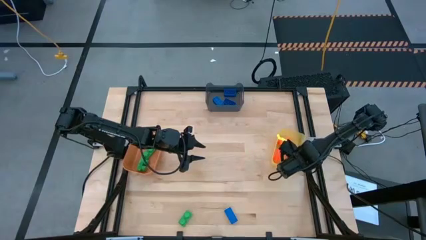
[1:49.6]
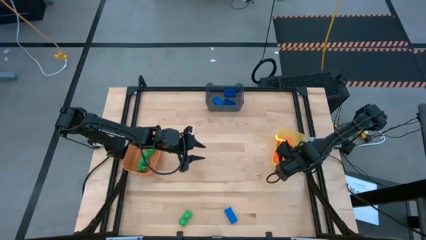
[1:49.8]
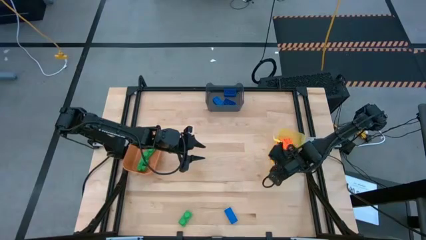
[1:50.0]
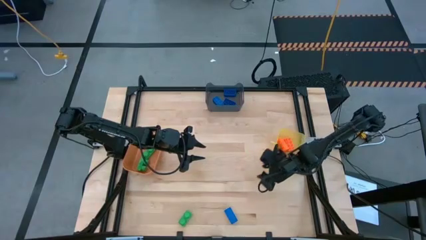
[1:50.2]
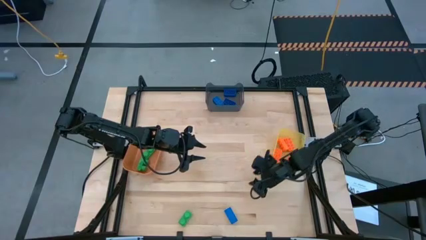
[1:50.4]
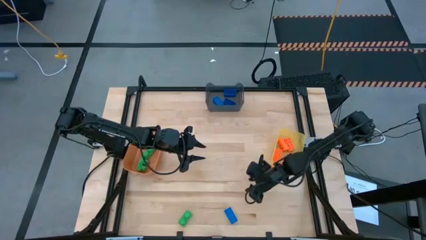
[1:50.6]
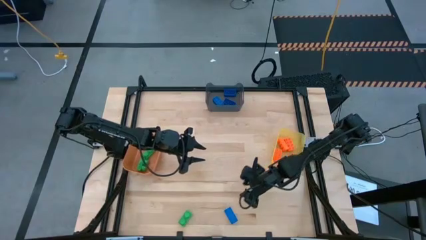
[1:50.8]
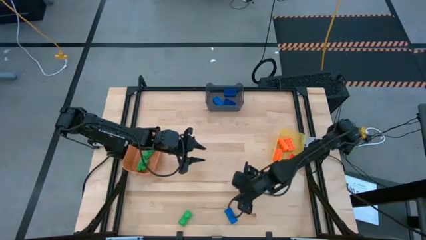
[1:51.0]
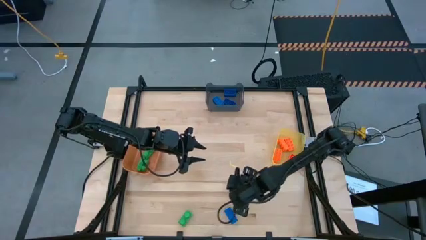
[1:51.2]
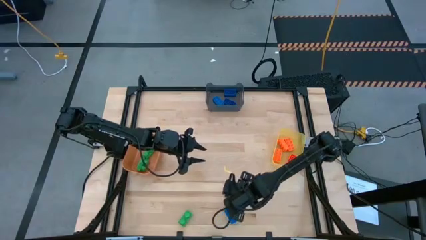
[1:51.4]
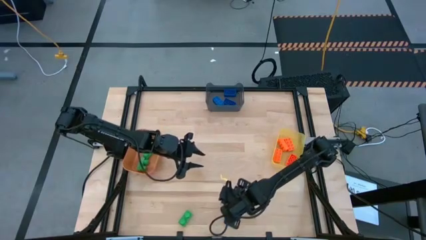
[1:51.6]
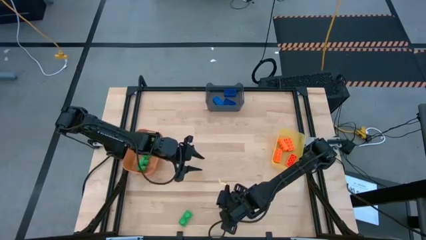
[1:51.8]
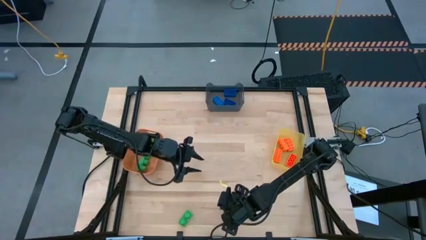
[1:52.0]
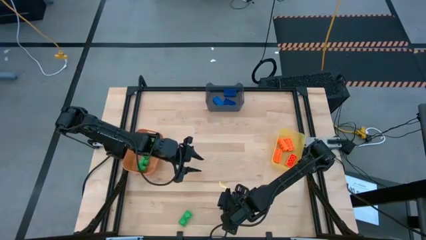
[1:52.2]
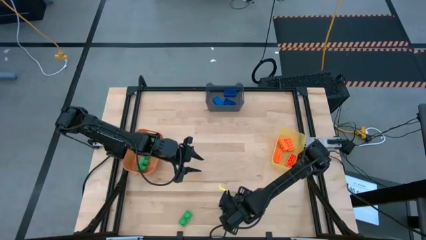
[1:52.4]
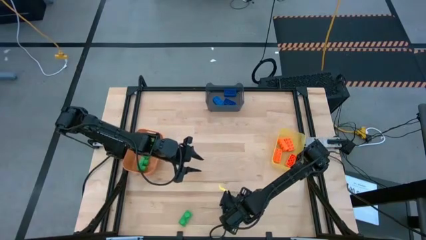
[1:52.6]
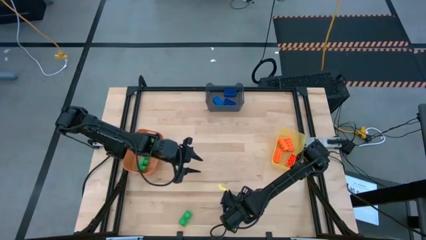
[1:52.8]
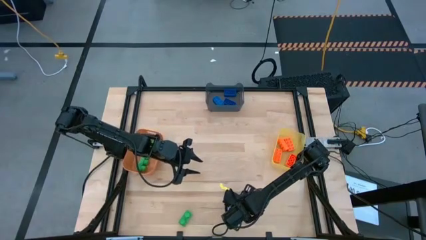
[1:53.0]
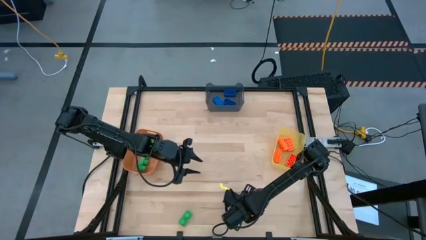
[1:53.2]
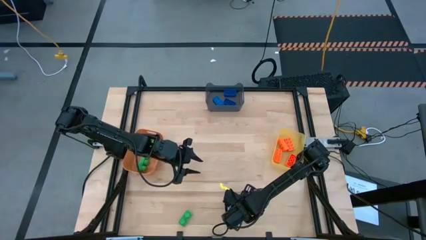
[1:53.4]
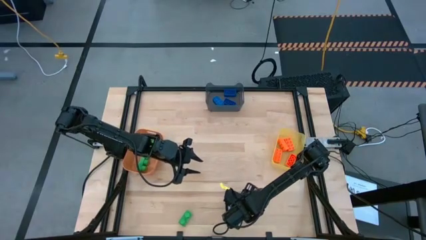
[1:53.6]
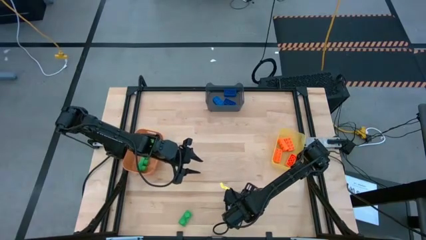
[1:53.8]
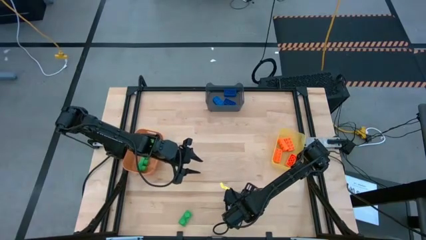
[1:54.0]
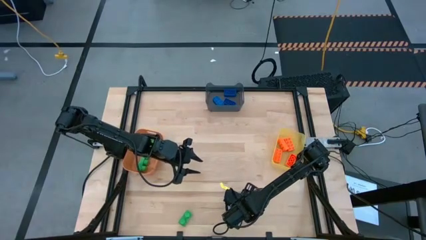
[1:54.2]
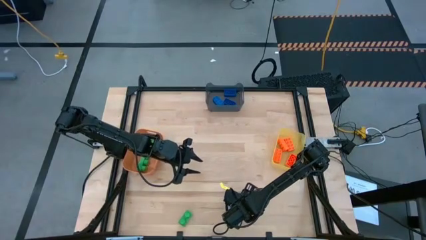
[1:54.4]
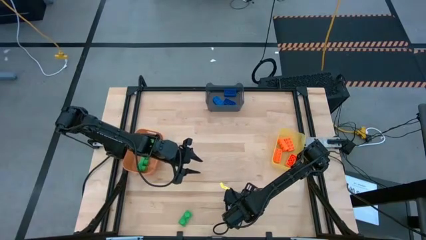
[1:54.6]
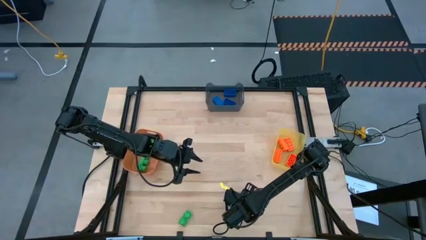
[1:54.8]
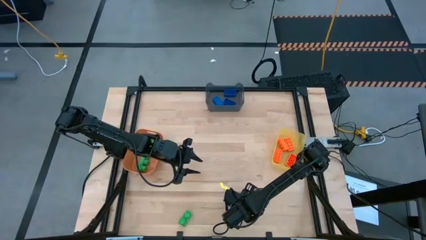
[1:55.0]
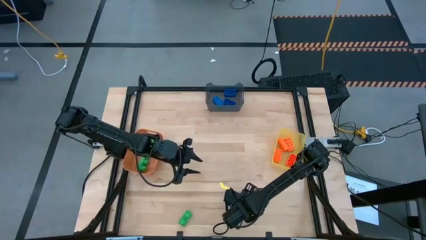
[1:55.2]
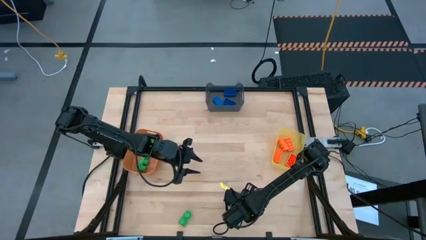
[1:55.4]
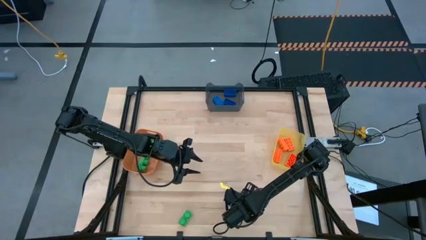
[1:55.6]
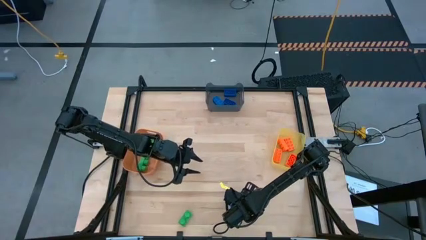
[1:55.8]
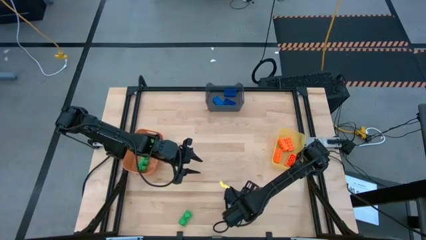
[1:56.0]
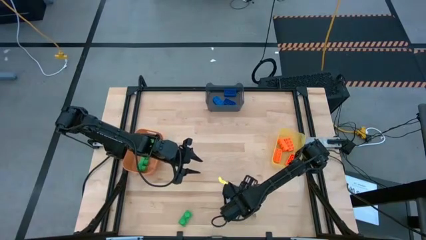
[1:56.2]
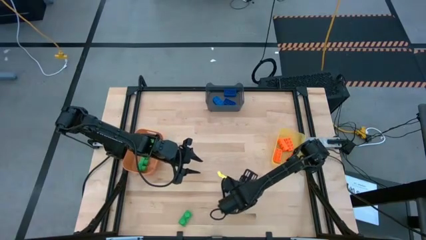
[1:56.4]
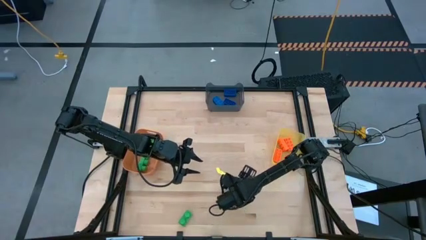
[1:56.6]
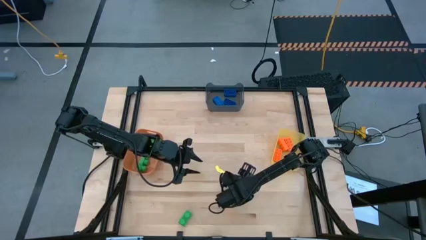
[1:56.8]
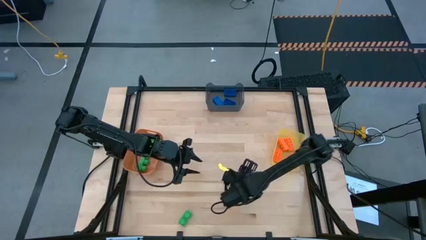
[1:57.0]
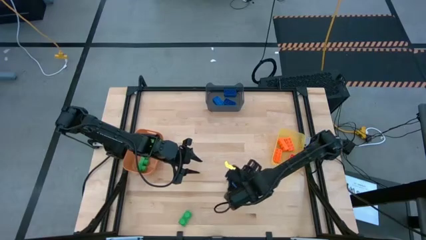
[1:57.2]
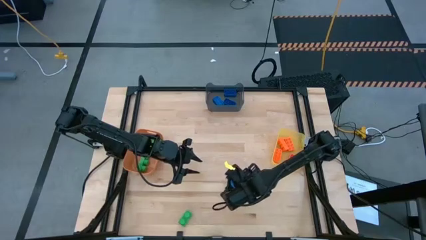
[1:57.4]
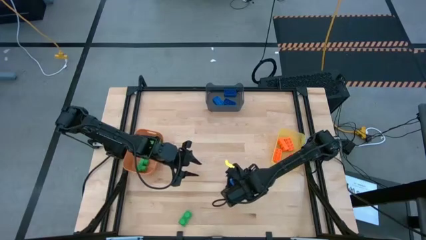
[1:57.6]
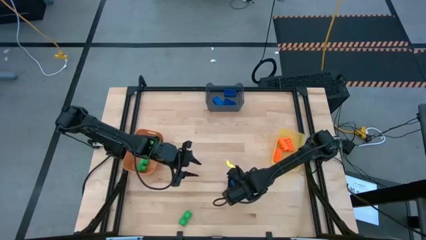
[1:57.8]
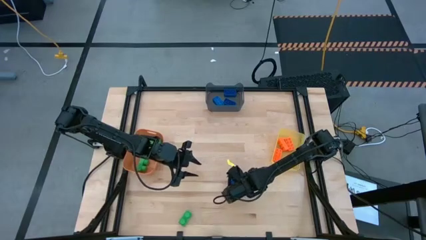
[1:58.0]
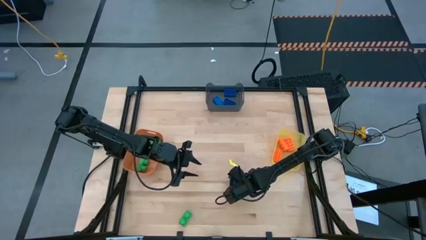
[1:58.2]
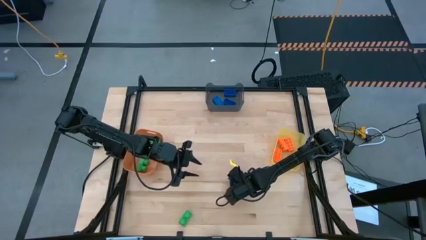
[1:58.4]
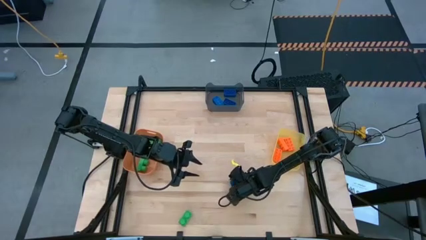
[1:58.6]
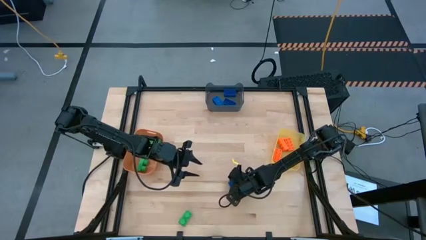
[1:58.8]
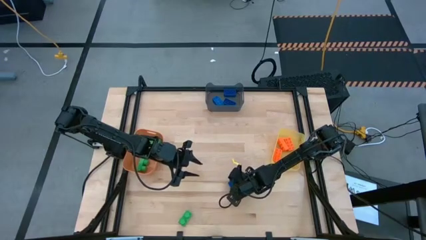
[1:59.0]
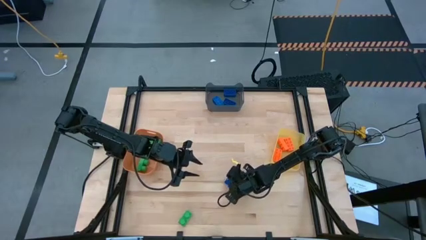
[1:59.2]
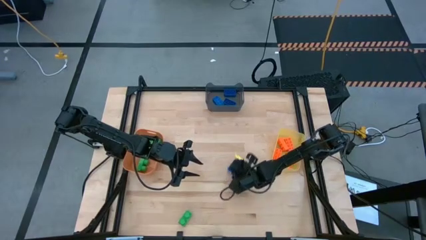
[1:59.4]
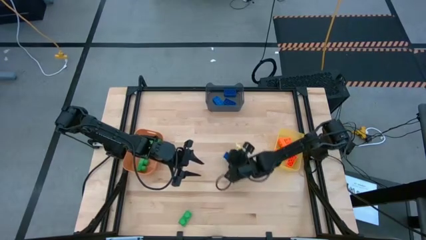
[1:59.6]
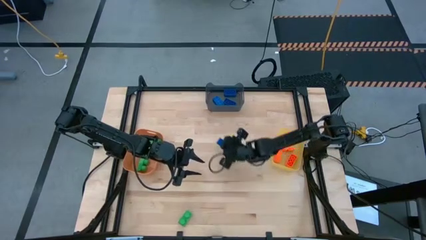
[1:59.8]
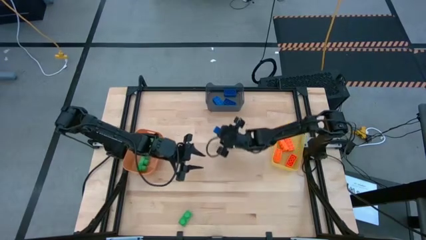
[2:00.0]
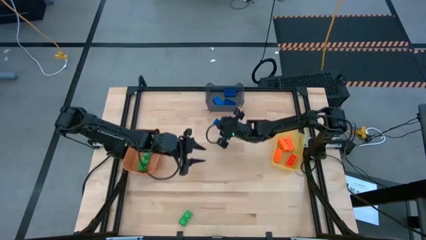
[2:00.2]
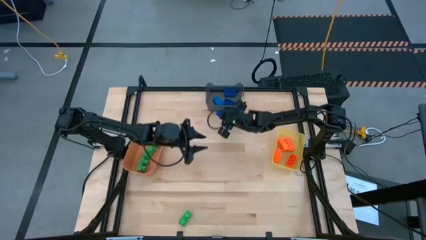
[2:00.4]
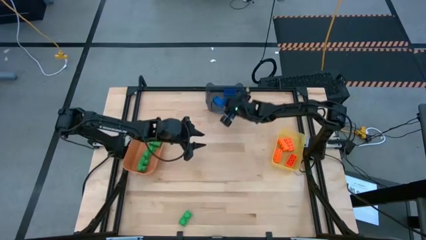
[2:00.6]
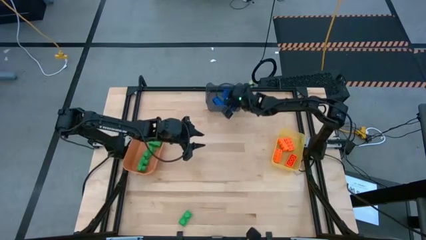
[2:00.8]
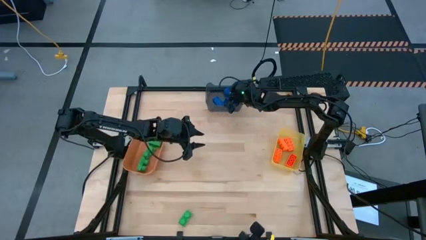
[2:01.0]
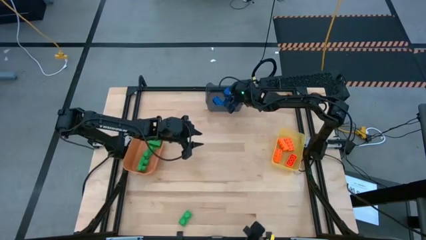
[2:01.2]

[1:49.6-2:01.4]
Task: Sort & place blocks by color
Put the blue game piece into the black bin

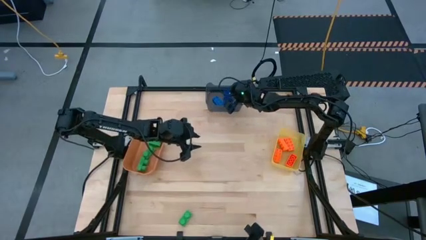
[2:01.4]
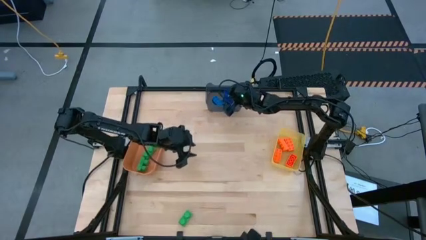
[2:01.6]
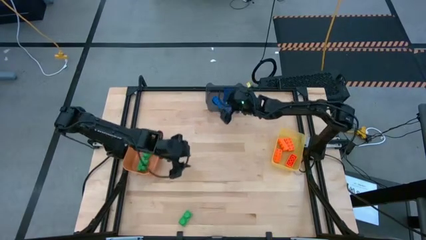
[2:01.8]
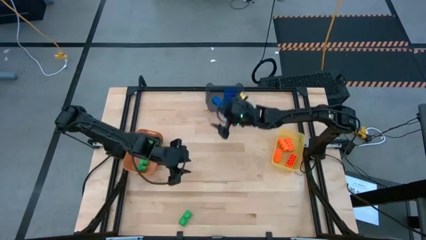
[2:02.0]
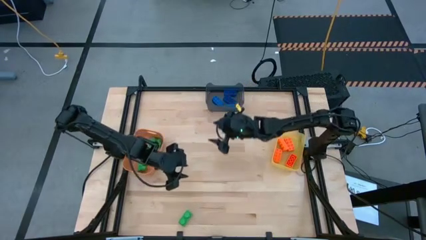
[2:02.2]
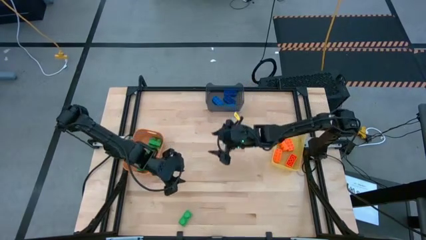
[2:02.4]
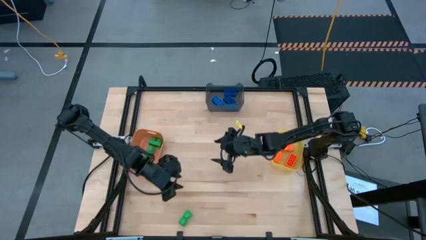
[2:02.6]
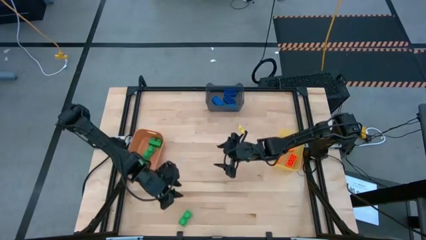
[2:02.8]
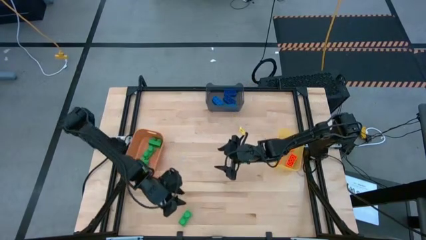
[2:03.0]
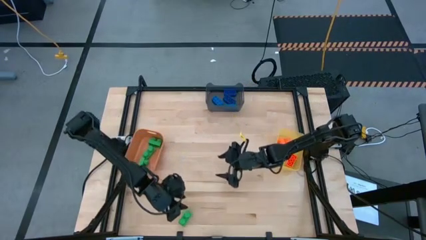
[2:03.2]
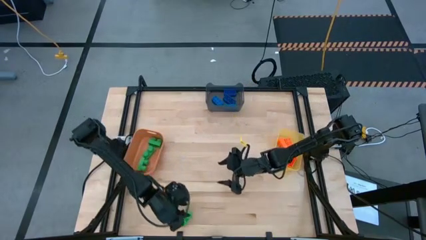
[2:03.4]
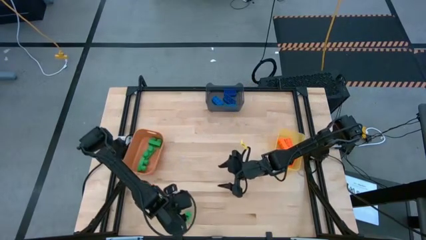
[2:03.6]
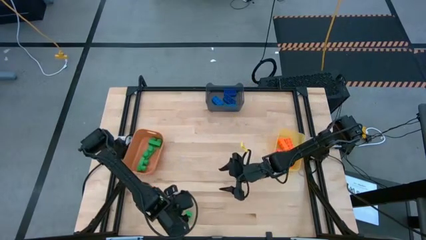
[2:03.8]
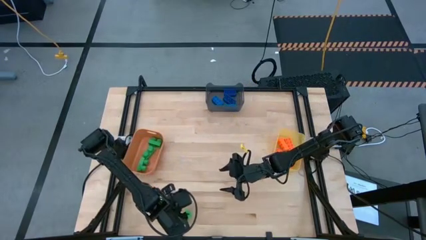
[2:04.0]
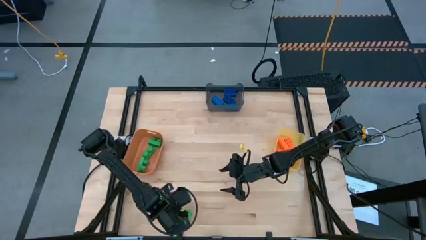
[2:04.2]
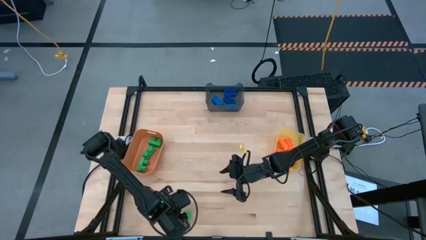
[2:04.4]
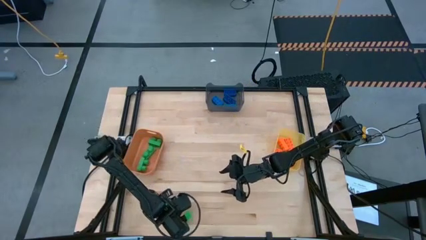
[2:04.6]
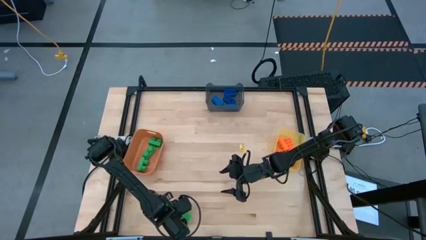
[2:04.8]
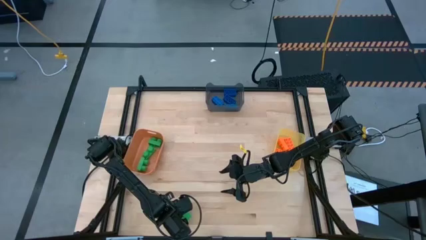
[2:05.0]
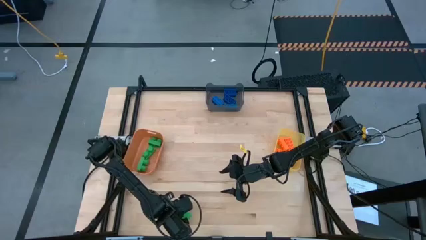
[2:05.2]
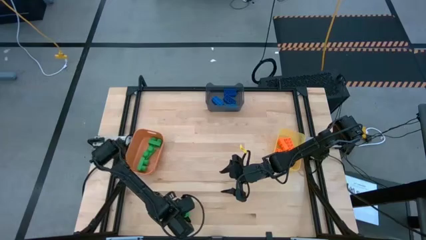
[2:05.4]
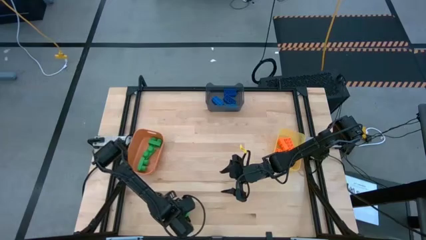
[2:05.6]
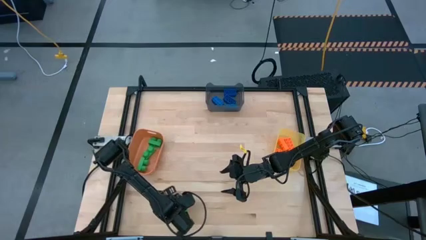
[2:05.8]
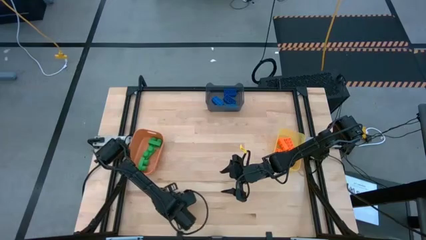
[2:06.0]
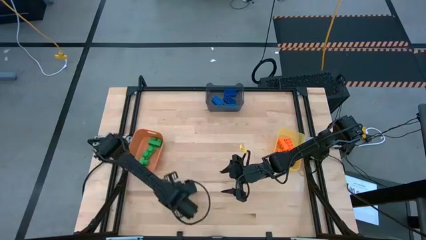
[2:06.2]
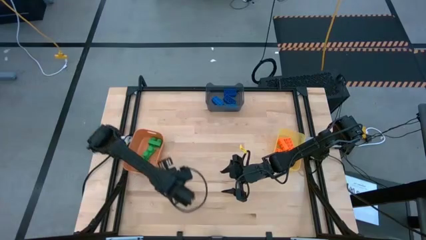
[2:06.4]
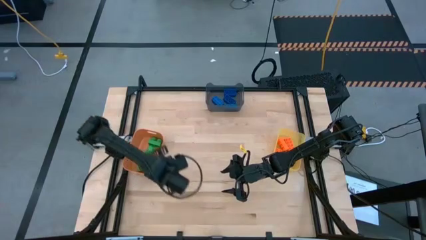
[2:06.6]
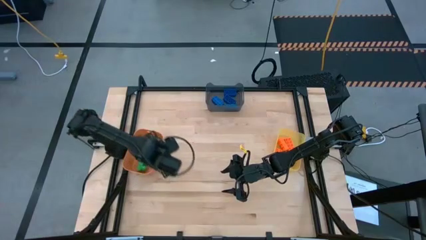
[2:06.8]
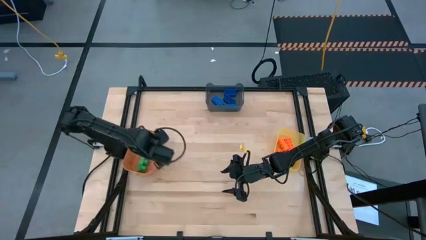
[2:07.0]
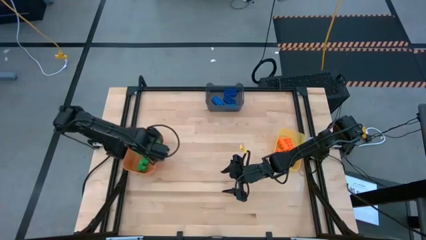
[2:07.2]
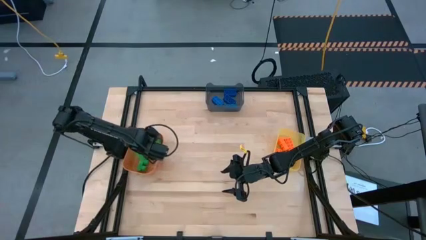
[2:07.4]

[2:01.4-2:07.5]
Put the green game piece into the orange bin
